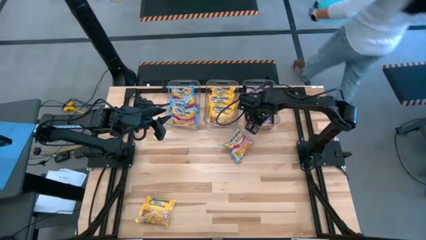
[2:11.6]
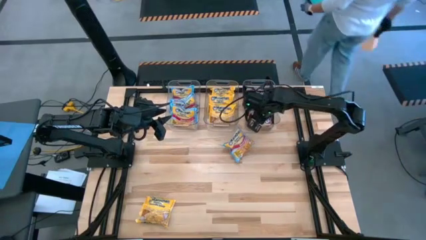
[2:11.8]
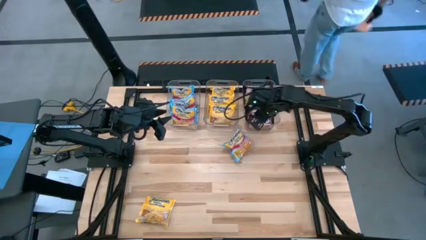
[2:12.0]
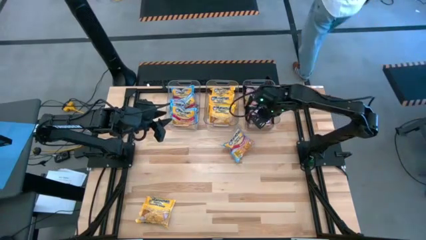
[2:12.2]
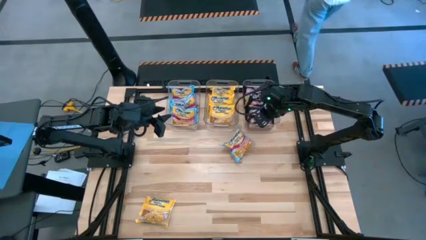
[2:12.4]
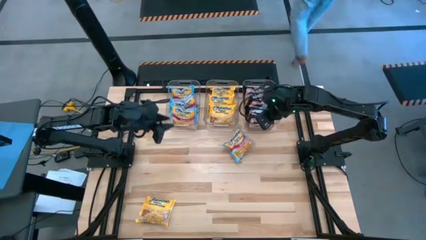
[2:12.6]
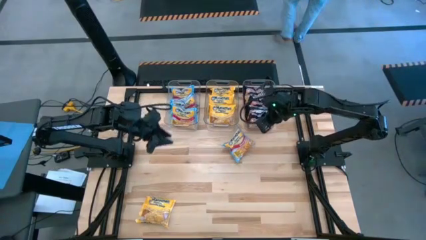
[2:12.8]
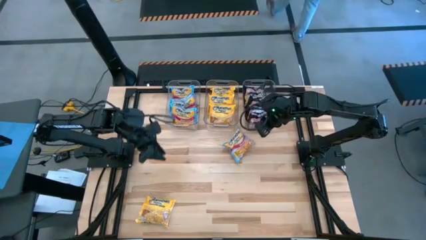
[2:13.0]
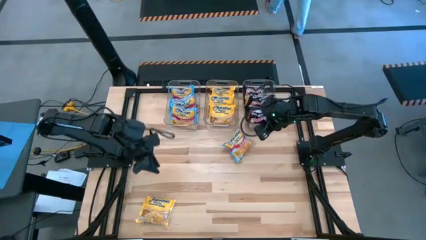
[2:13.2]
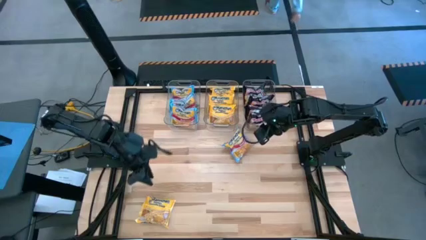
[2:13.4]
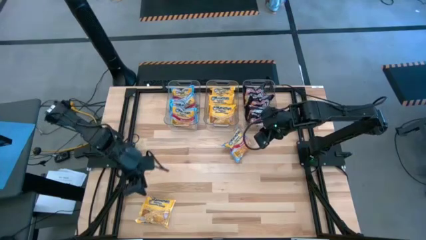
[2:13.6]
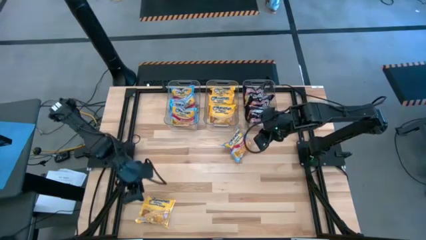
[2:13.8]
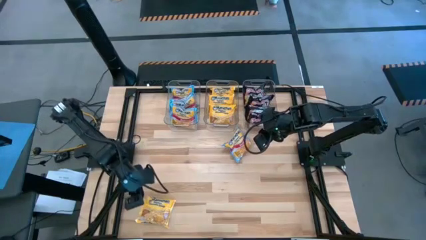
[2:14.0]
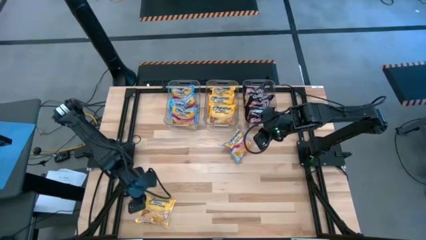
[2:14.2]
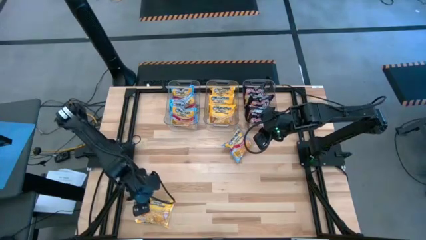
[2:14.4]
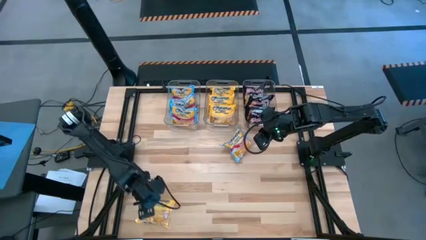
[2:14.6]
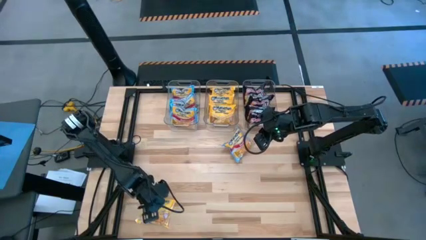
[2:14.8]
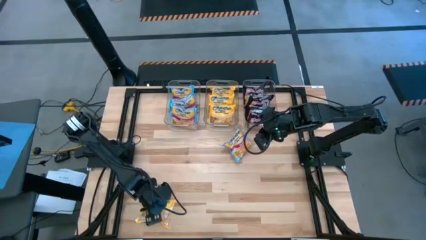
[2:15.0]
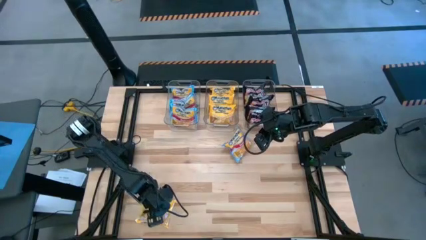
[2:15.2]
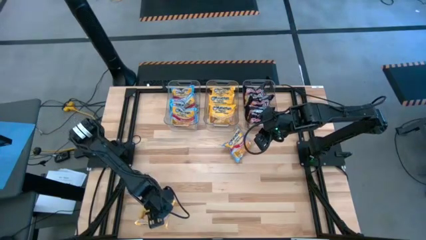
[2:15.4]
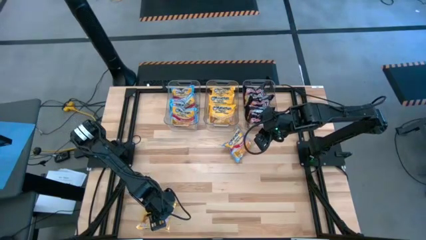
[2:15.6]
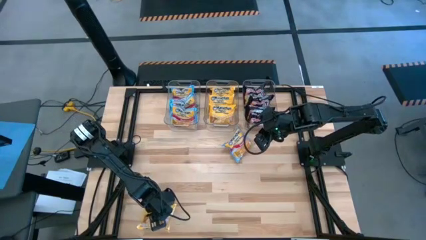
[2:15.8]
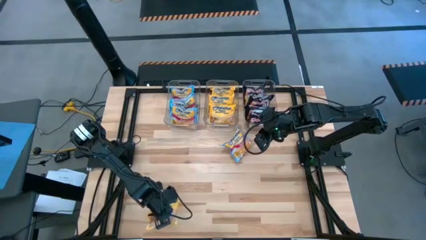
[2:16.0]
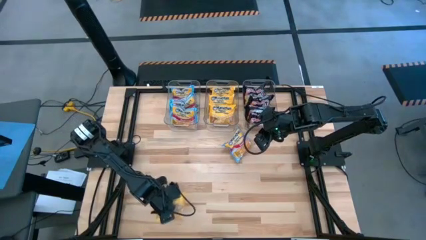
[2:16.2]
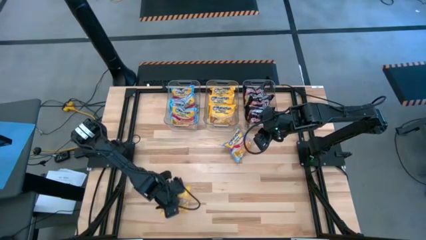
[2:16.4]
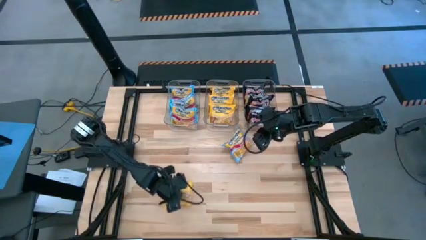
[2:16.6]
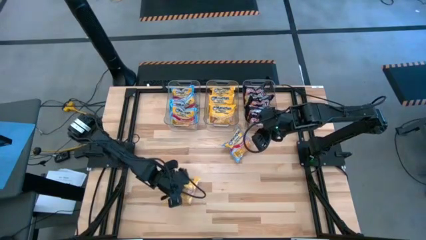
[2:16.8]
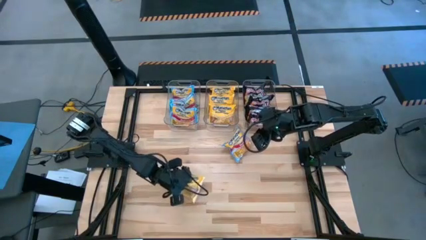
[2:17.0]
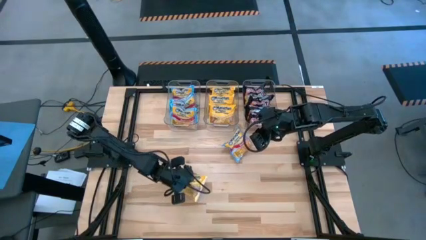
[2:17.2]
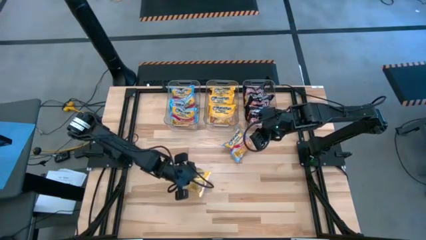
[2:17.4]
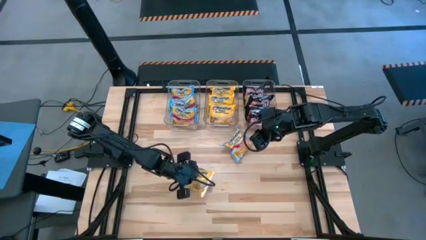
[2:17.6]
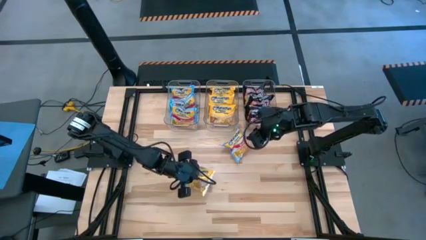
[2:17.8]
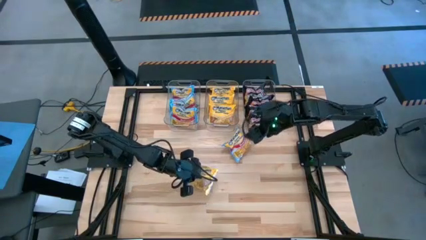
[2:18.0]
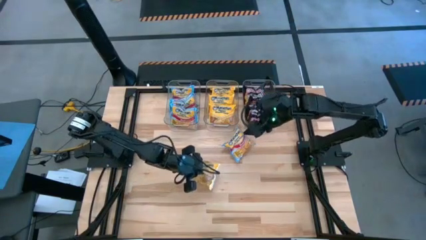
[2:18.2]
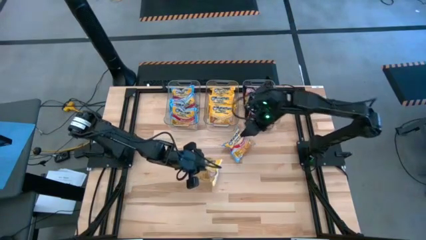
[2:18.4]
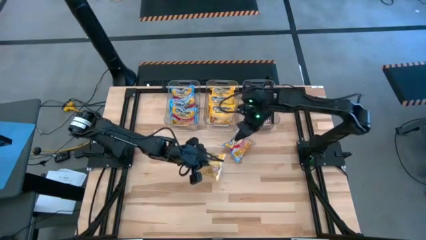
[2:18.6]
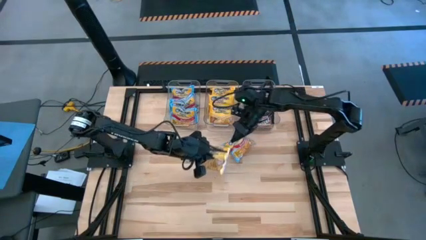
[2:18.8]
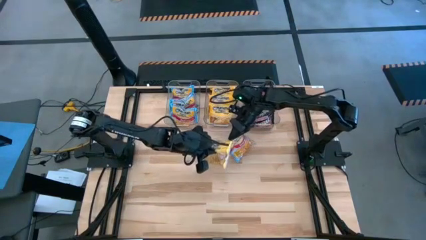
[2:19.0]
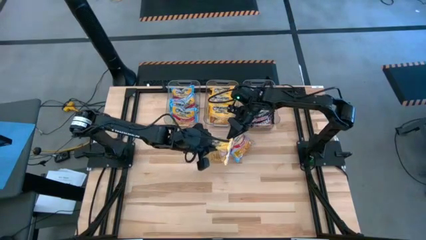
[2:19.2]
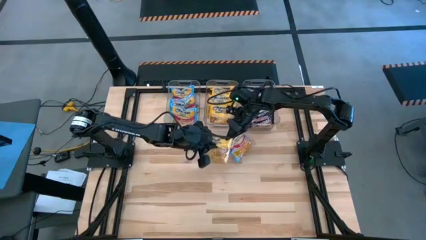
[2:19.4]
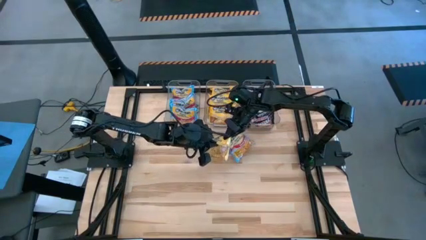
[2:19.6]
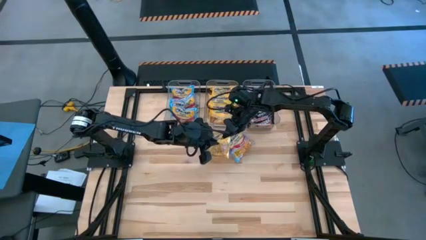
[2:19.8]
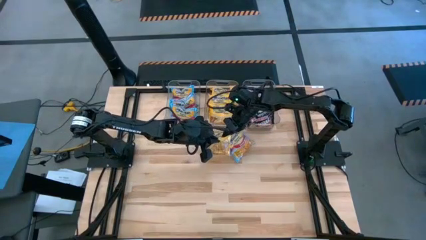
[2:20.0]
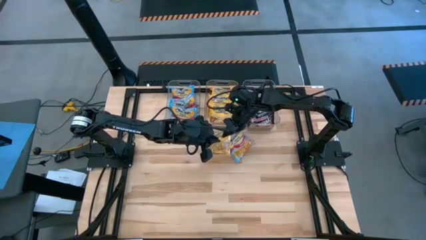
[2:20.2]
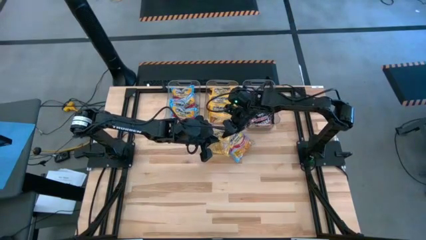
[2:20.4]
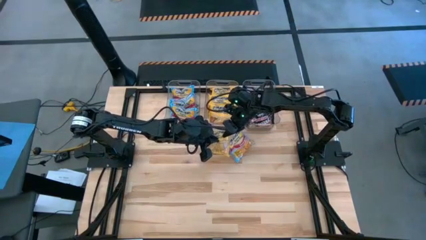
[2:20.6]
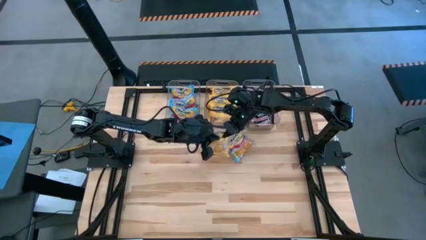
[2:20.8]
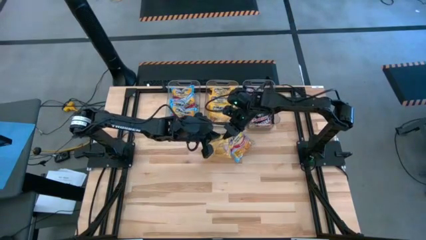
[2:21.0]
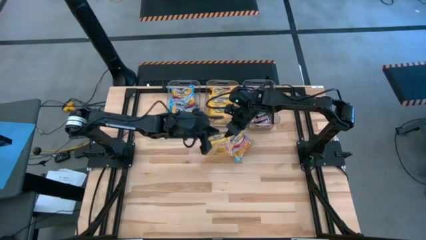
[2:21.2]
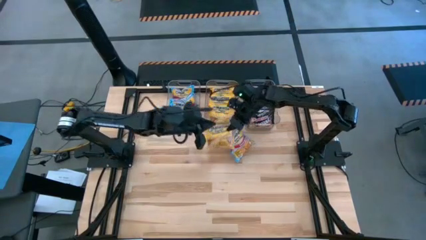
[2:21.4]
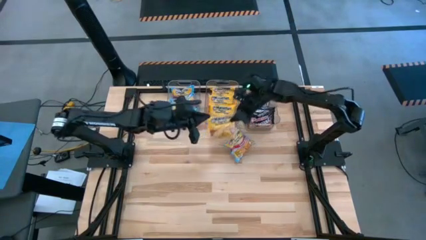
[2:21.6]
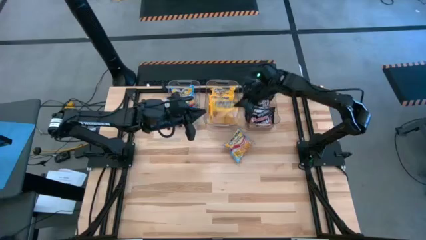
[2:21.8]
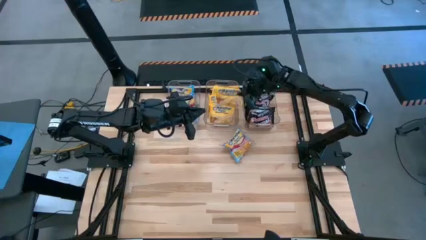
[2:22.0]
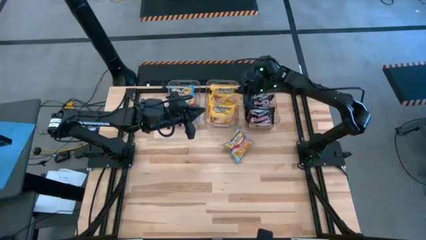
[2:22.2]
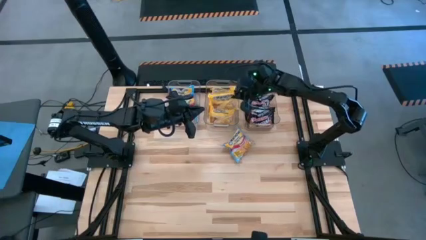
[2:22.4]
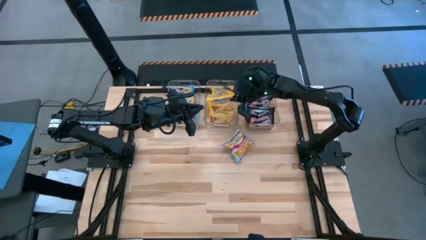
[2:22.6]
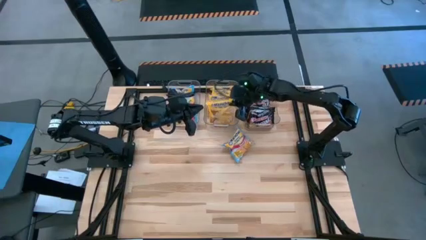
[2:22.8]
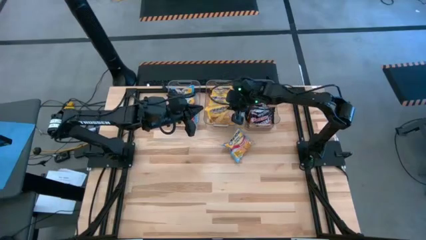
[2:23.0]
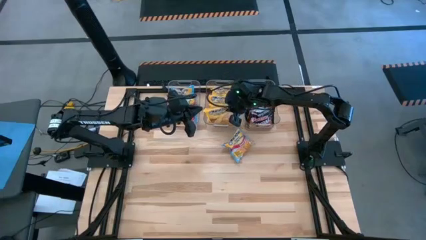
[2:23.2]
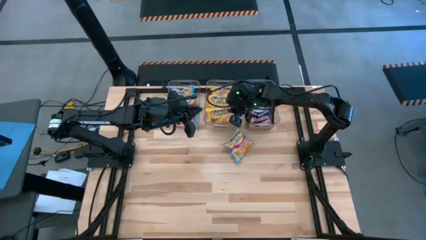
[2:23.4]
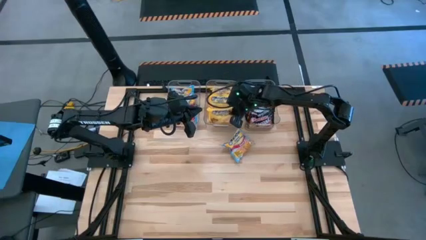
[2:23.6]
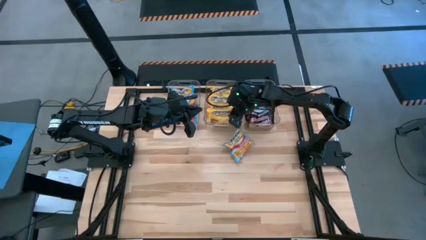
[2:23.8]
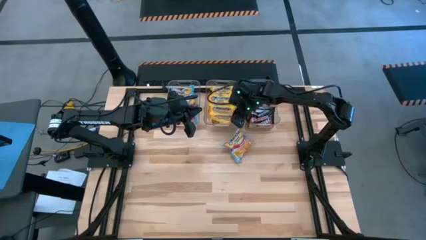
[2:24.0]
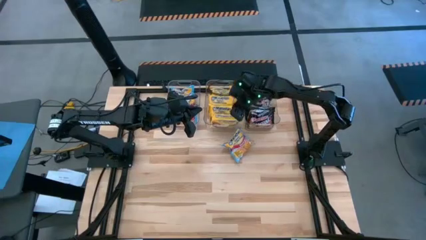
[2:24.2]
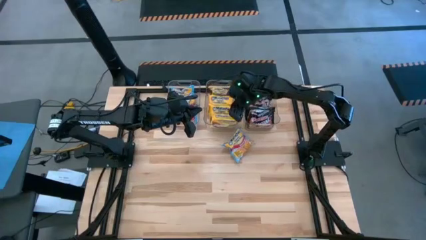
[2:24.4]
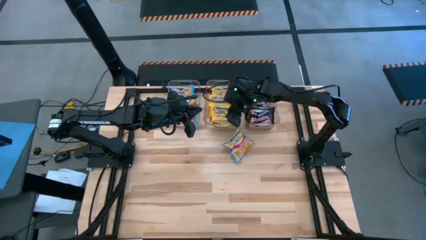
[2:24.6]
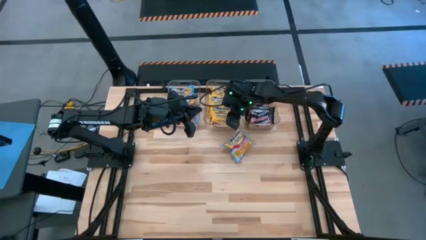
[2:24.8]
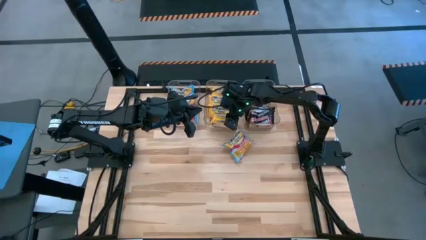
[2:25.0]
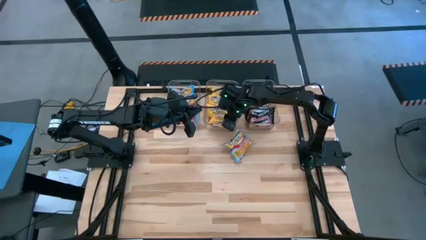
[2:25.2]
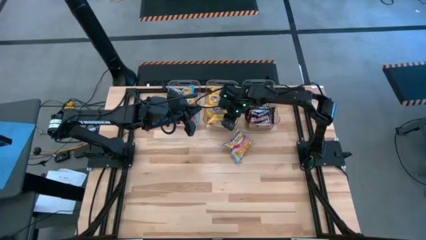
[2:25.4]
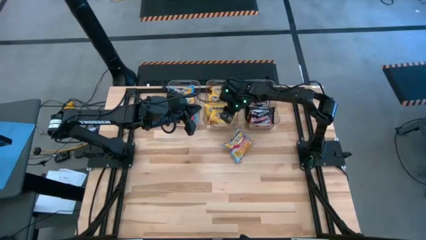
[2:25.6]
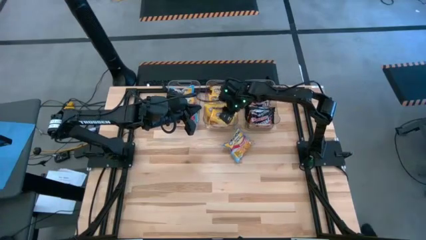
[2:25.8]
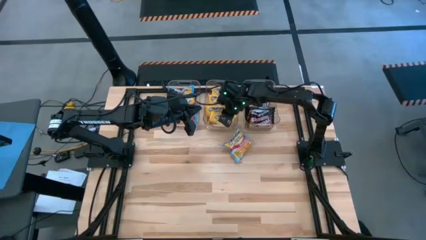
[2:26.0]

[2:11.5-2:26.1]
Task: Sort Maruchan noodles
Put the yellow noodle pack into the middle transparent bin
